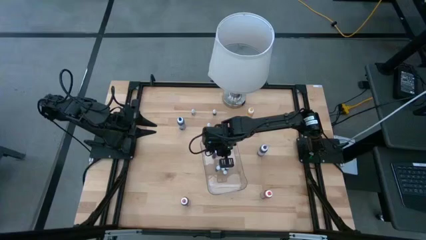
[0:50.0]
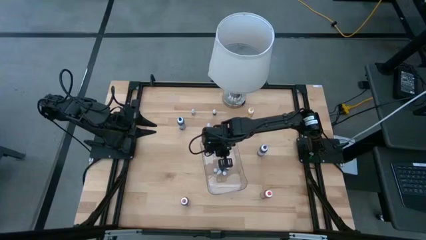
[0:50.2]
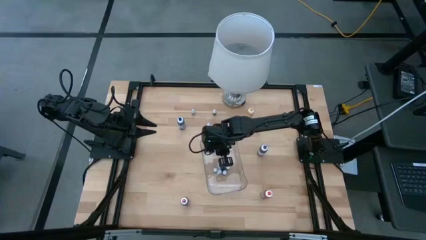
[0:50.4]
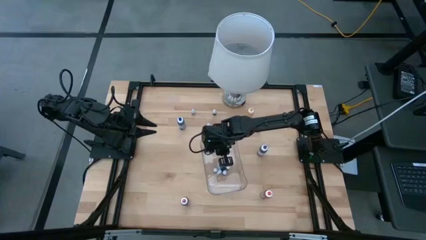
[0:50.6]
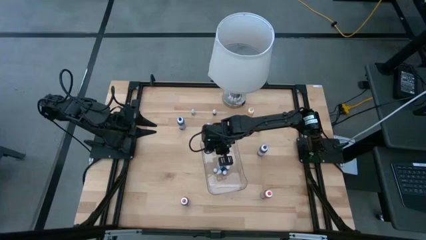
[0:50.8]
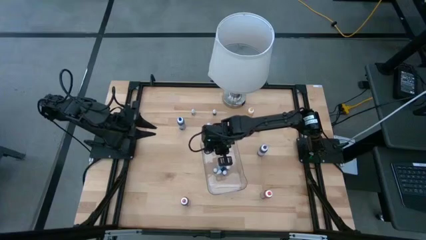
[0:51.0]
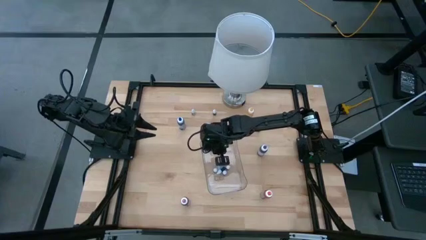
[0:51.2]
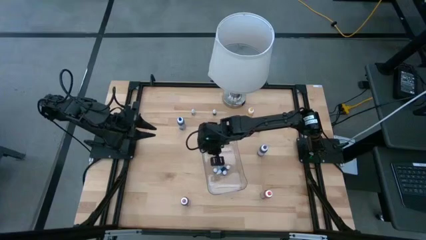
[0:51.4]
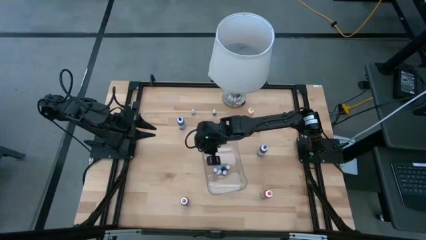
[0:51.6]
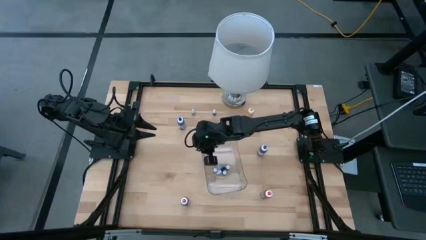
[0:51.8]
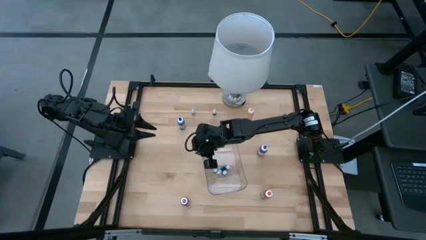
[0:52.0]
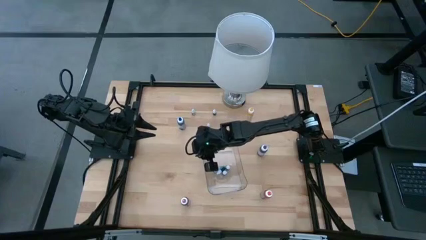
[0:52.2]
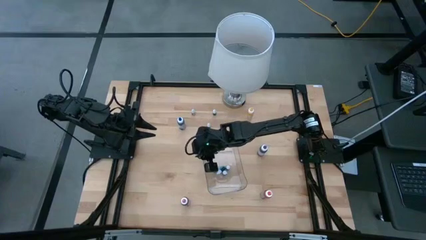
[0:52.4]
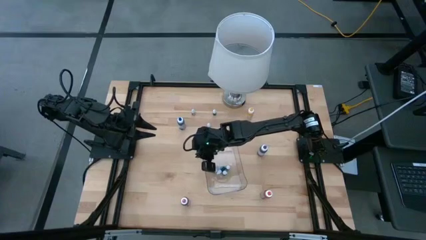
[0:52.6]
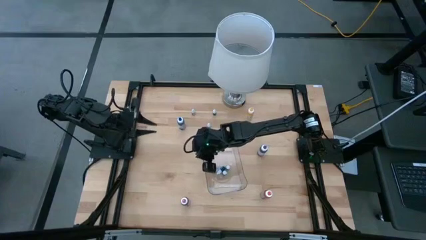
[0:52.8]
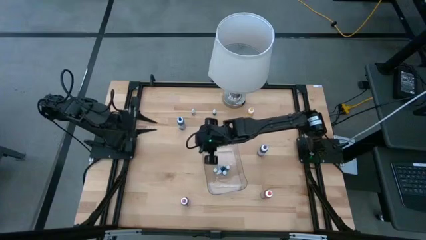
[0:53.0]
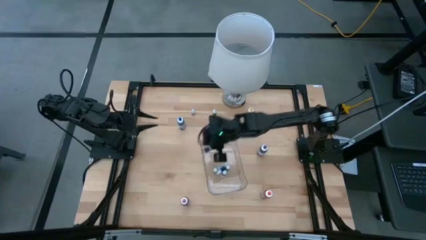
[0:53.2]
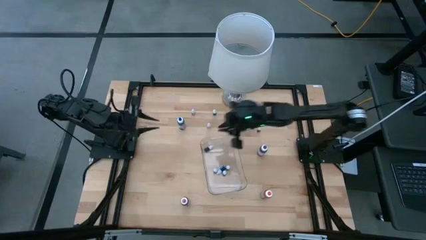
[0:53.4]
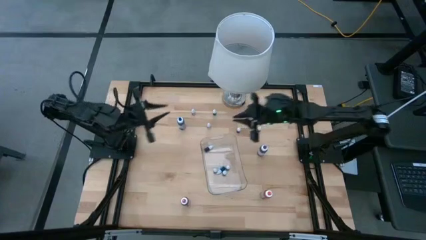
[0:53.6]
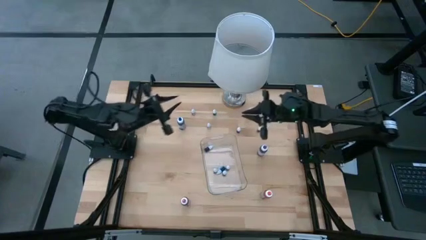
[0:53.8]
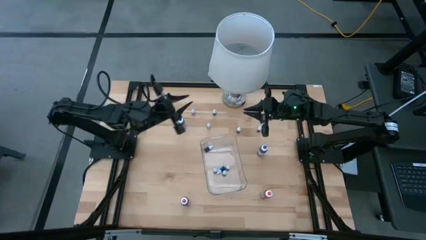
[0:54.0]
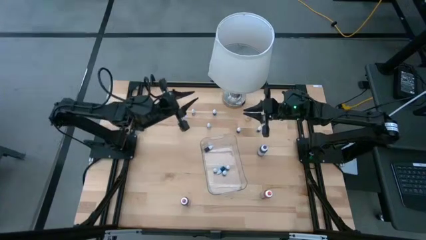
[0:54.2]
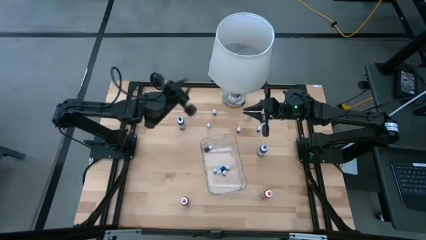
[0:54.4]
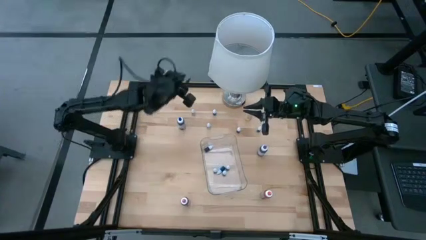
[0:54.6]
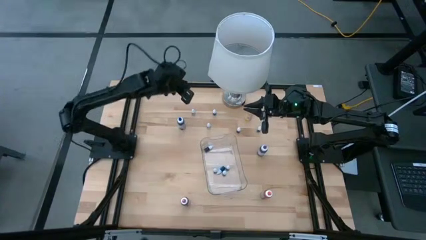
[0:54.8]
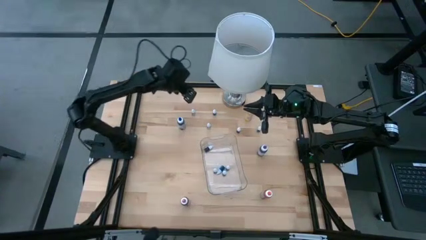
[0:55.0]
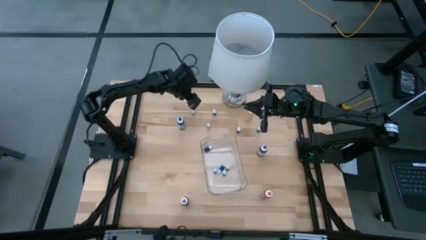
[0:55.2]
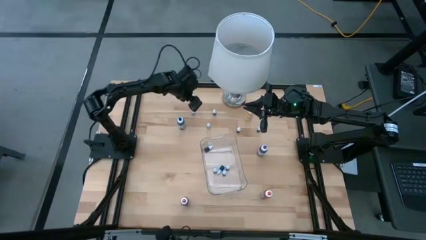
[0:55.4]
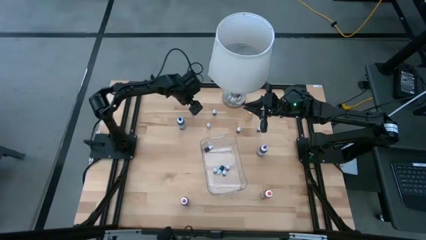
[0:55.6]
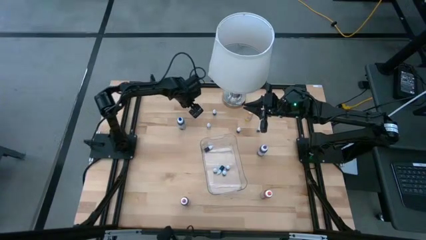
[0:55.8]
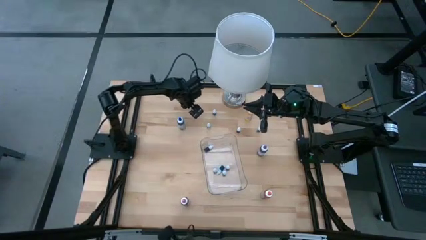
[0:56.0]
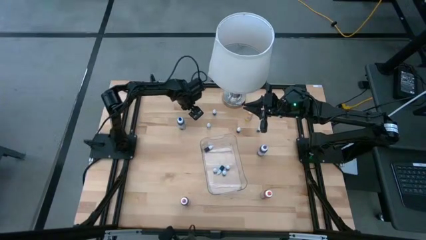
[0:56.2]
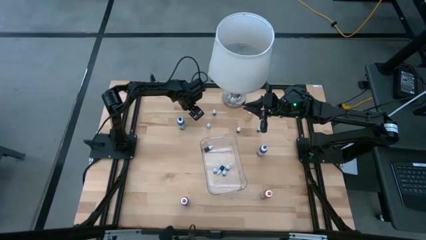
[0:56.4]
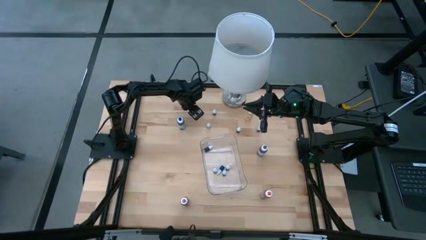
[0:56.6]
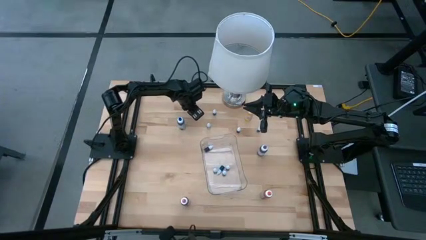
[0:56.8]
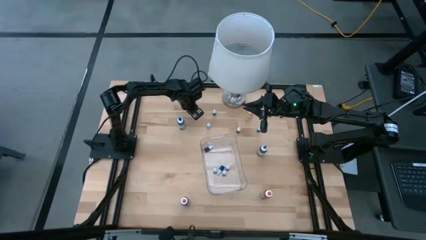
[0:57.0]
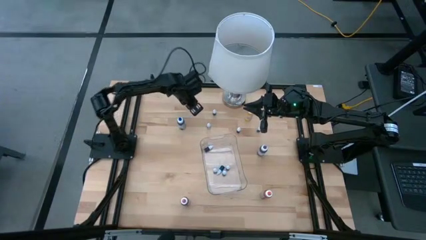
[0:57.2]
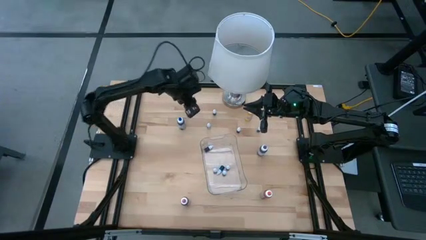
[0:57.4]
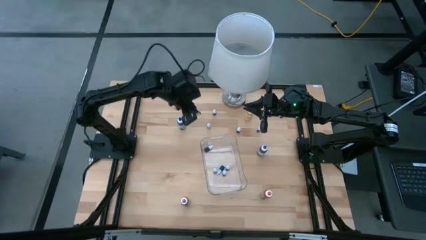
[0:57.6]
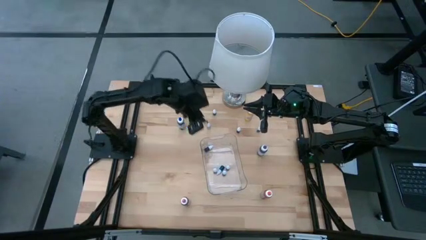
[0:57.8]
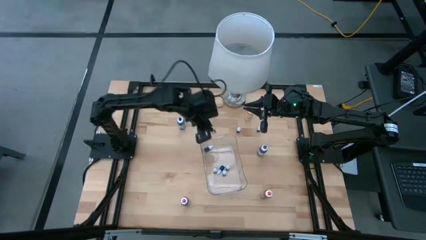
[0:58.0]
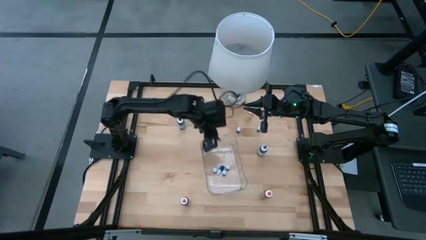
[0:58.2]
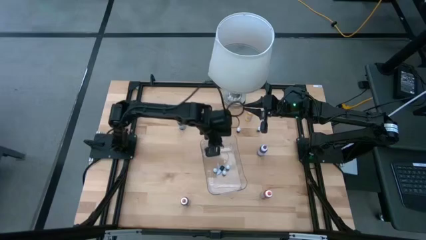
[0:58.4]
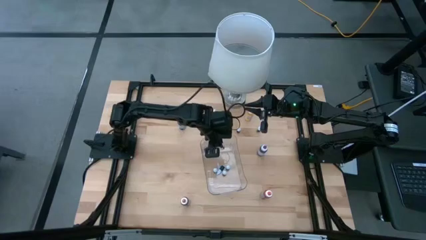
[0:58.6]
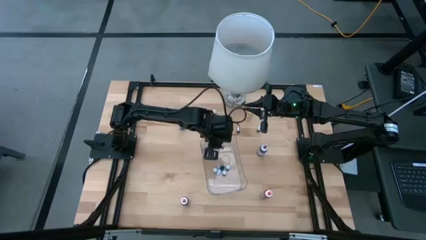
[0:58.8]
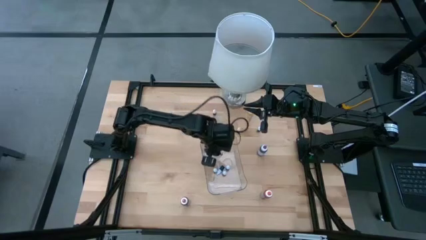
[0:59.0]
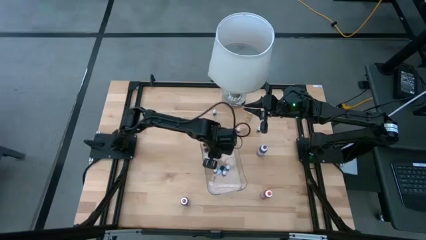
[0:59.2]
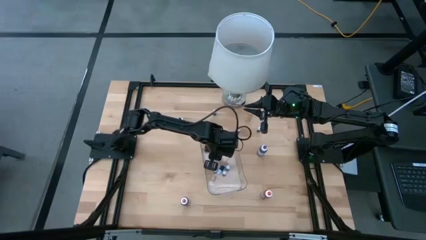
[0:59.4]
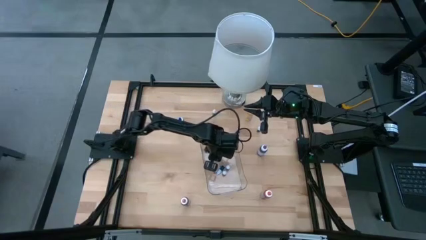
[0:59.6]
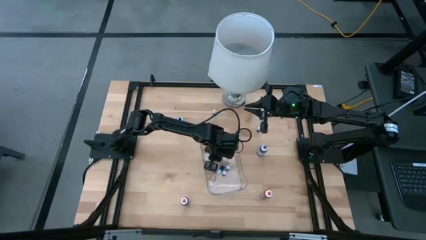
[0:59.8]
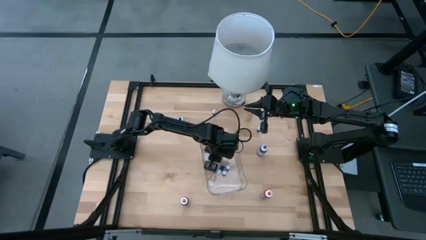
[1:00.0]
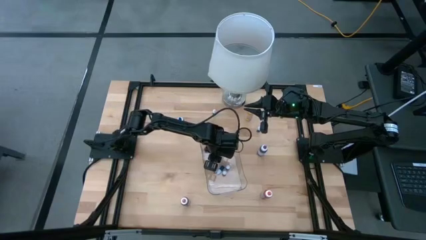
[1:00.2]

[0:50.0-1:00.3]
Task: Pick & Place food coloring
Put the small red food coloring bottle into the transparent bin

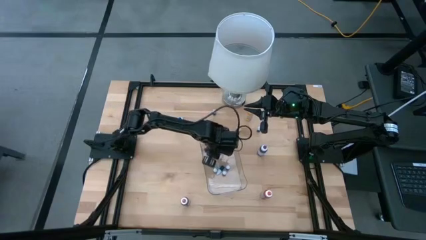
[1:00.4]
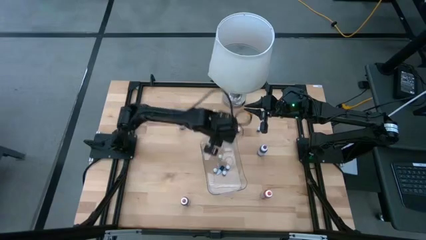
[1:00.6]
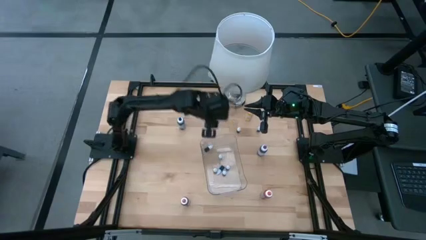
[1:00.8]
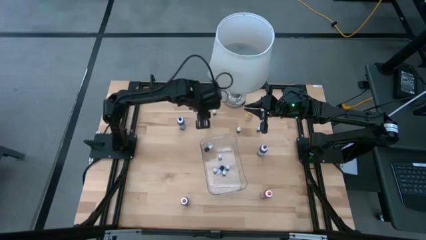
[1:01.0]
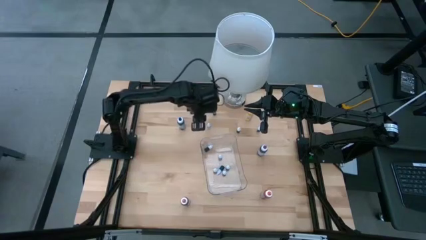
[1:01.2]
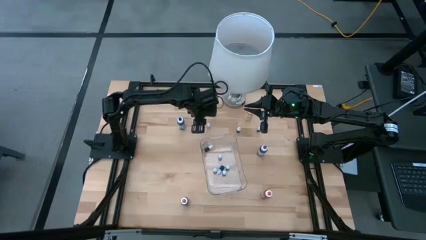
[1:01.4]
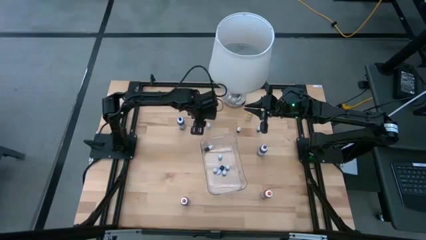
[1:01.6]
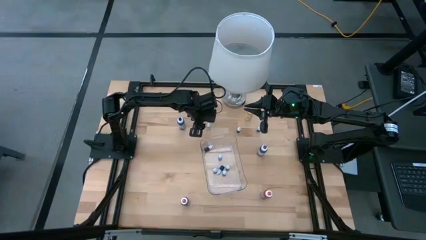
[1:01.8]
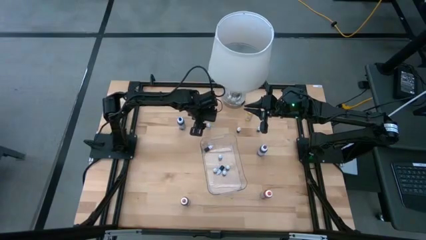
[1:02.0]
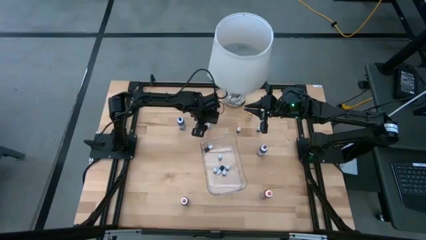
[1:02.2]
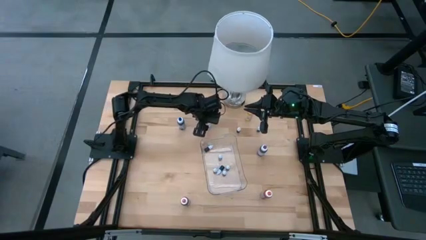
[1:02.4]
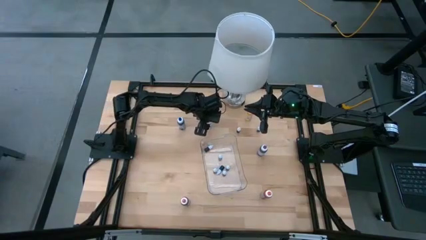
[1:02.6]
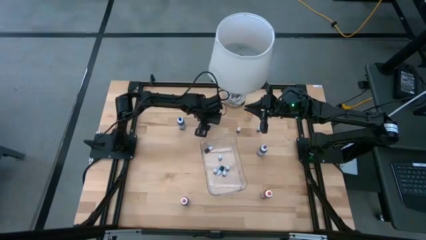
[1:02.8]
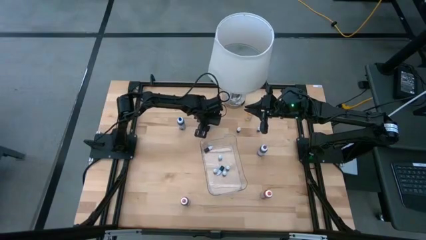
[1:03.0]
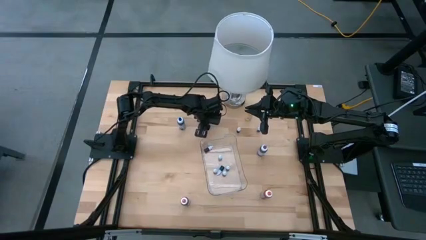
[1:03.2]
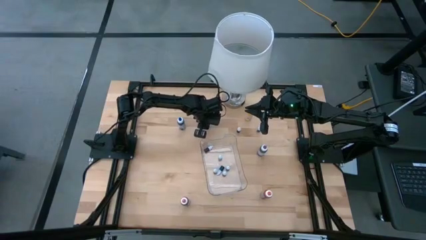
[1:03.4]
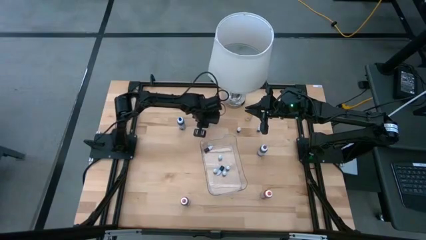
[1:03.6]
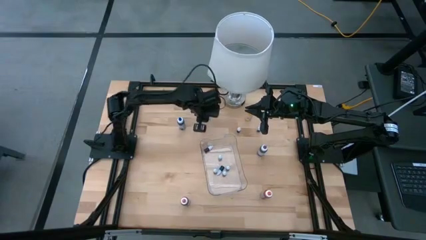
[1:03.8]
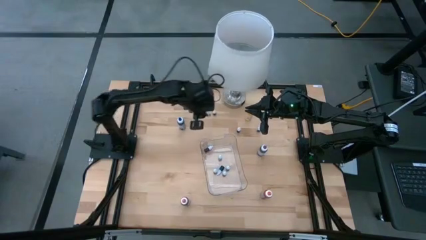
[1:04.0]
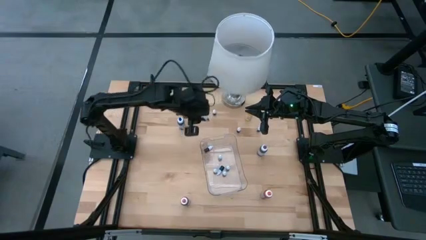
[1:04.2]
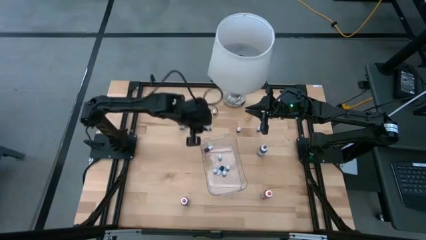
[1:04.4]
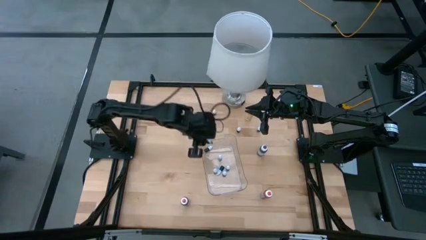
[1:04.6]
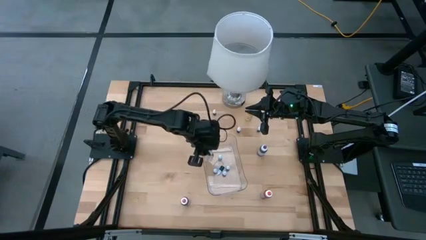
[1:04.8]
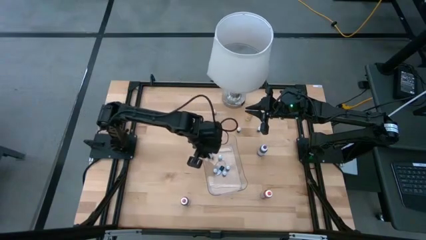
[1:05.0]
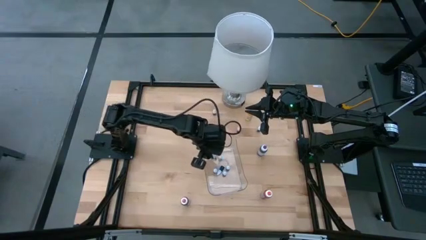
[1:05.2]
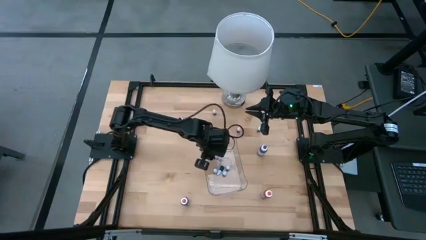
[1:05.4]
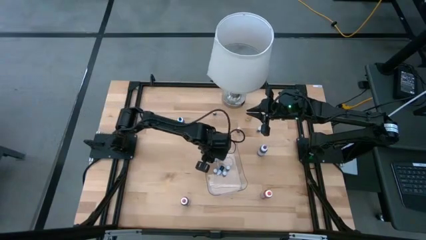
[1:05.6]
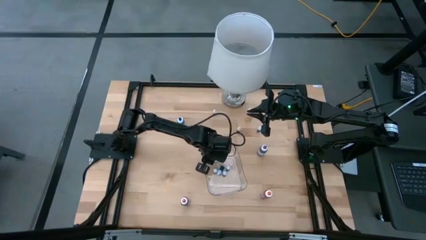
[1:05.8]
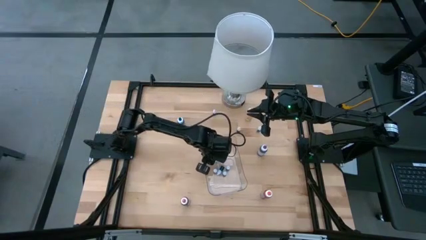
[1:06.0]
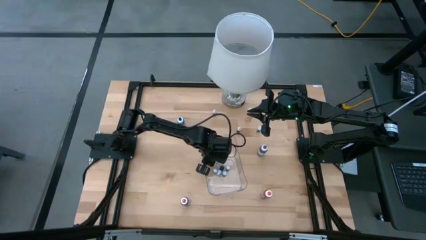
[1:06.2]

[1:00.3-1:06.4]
Put the small black food coloring bottle into the transparent bin
